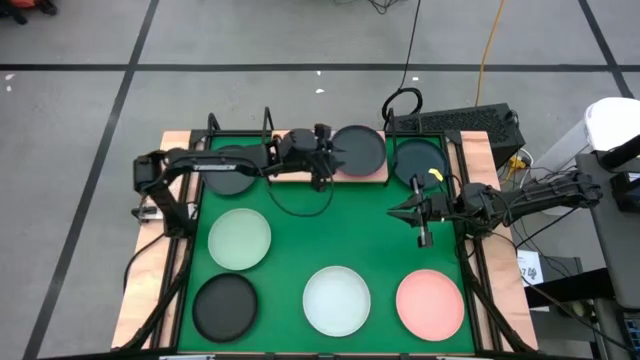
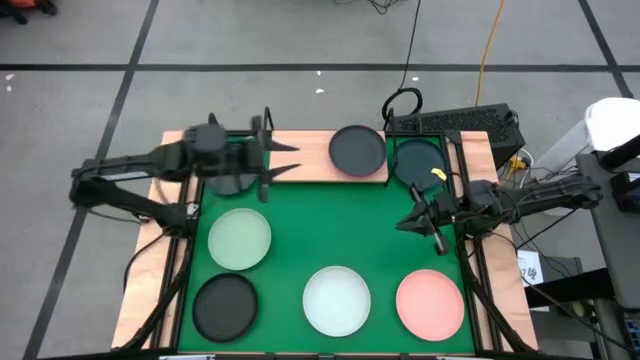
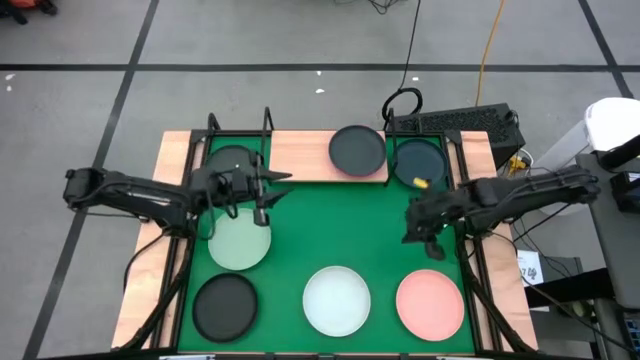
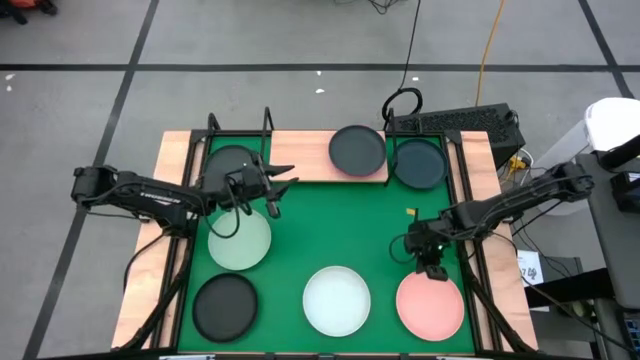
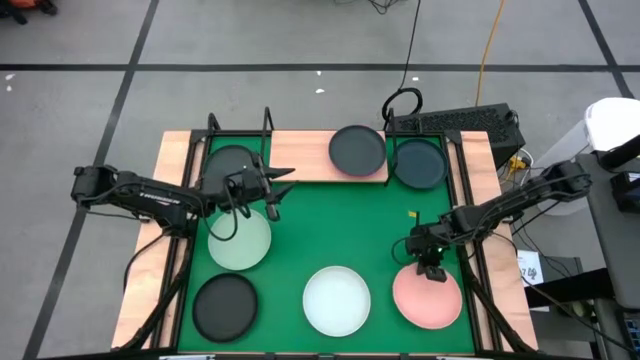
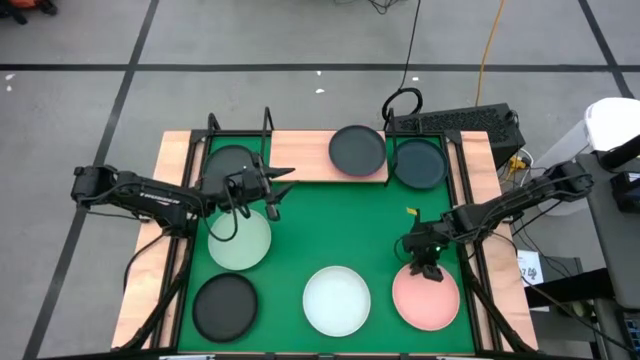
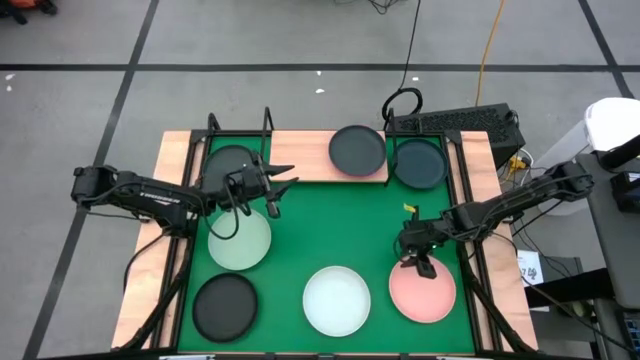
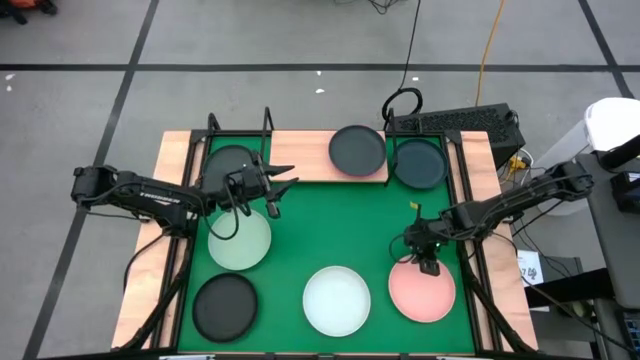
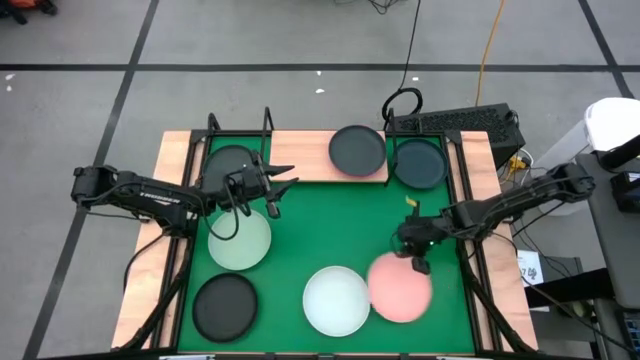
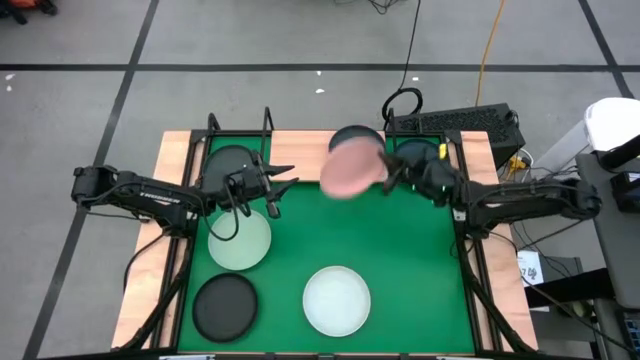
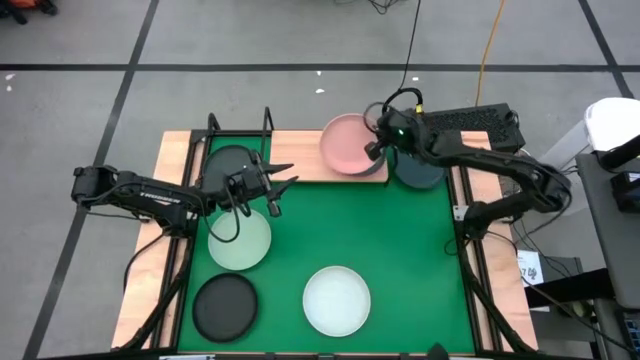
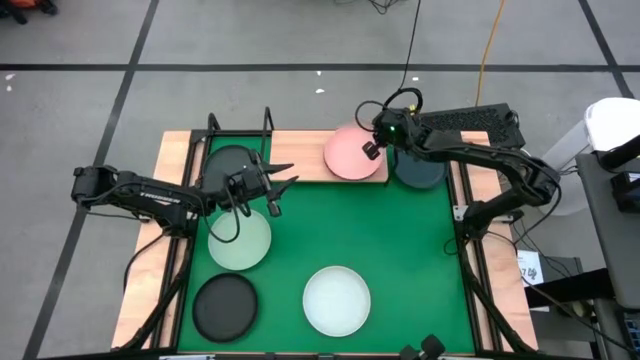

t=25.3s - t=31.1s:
Task: Place and stack plates onto a shelf
Stack the light orange plate on top of the black plate on the shelf

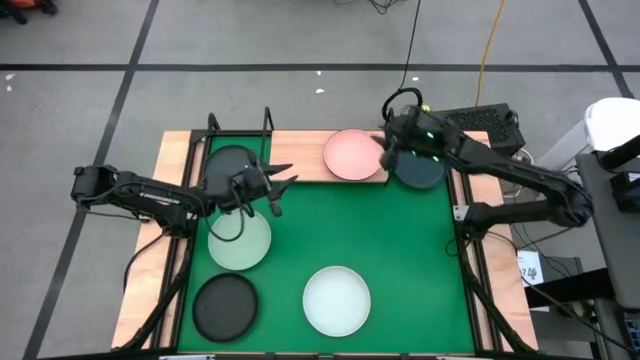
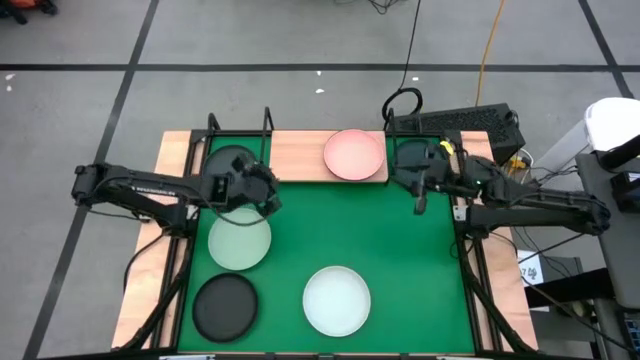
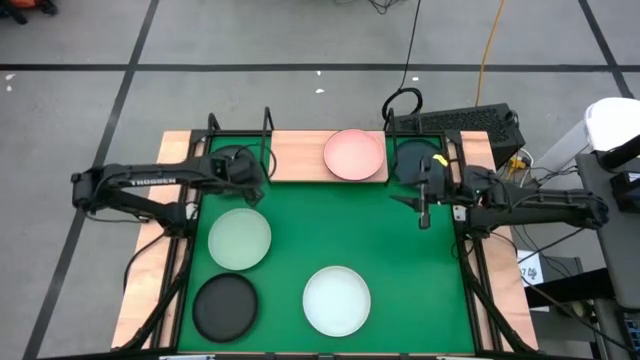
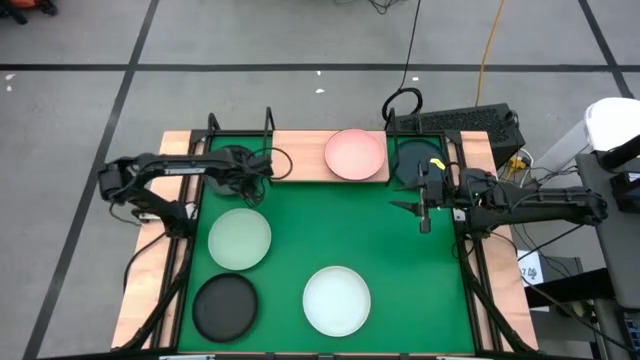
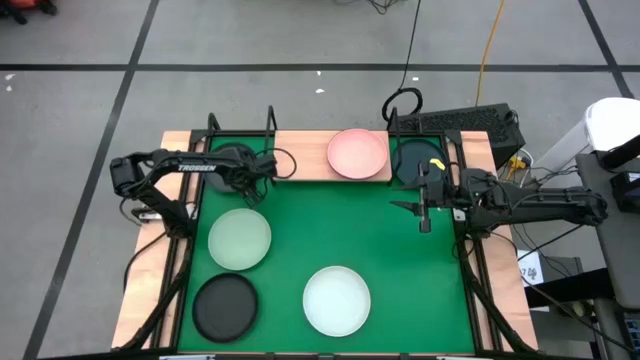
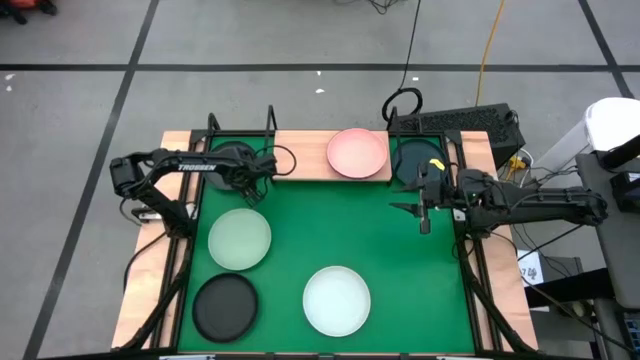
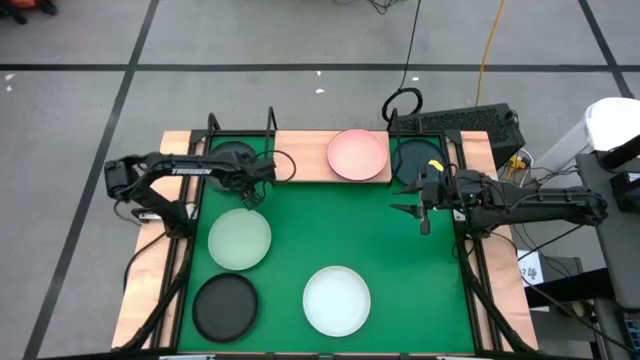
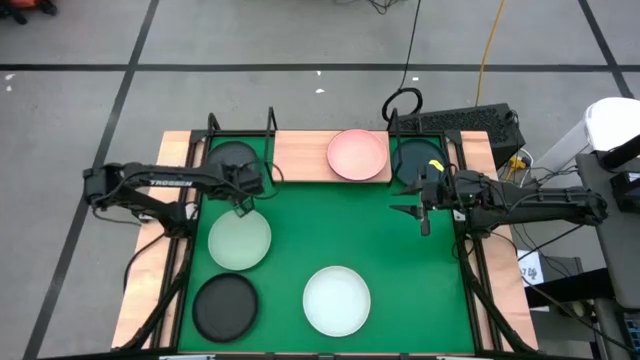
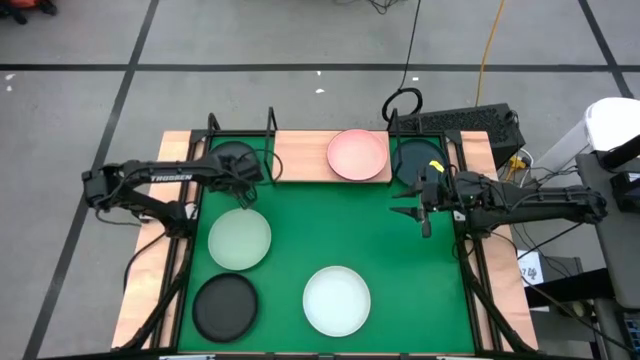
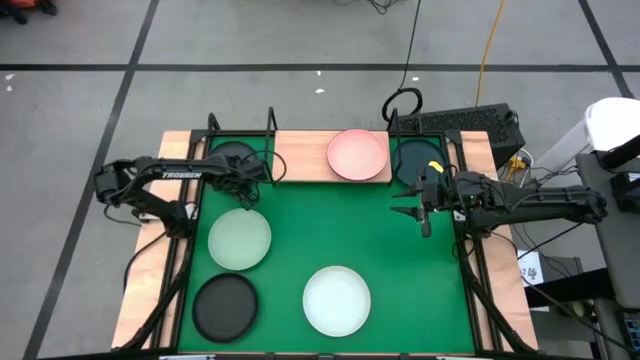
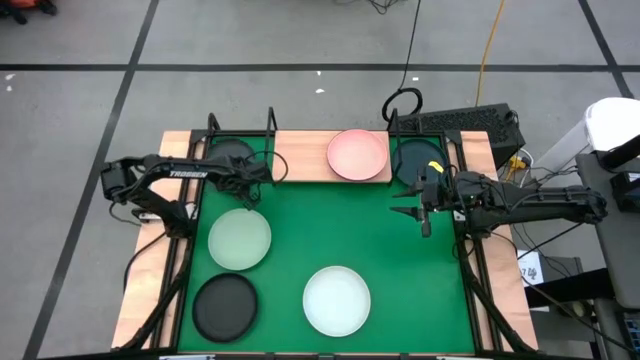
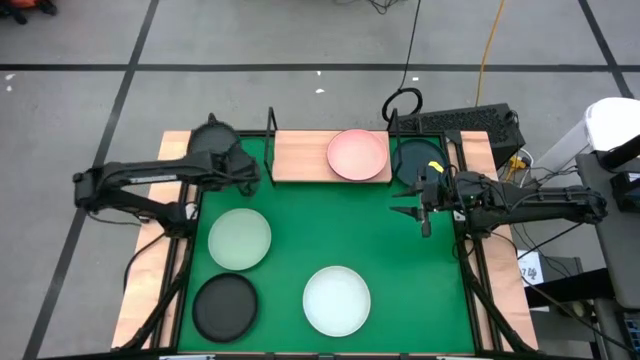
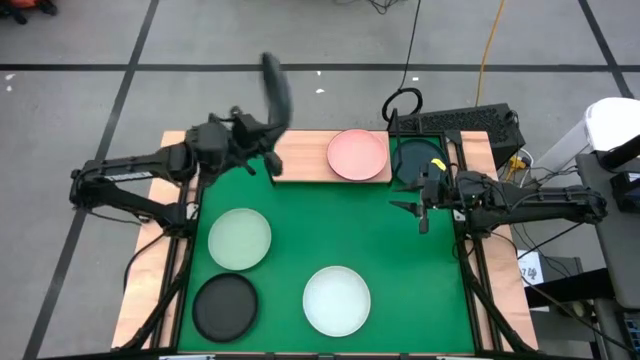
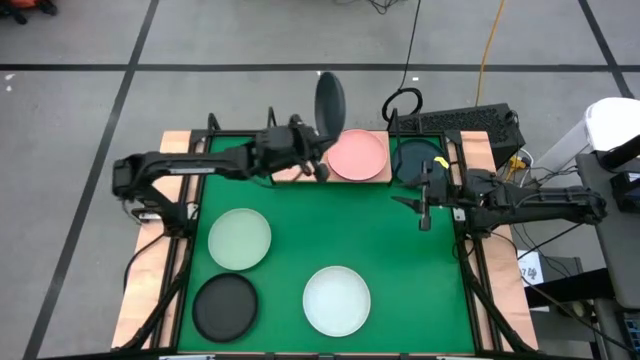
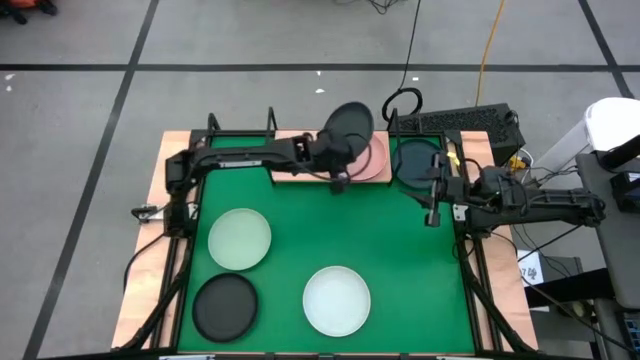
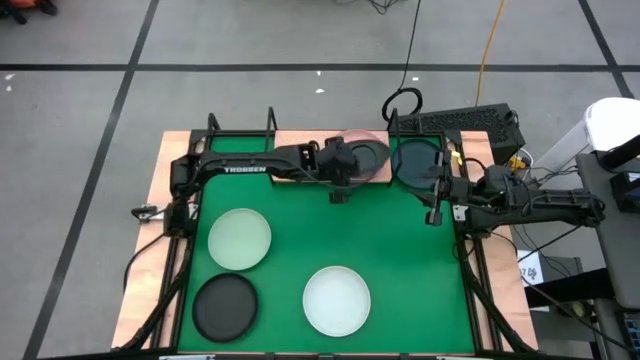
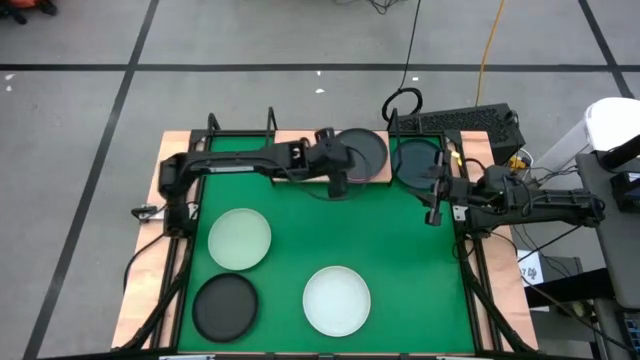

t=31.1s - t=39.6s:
Stack the top black plate on top of the light orange plate on the shelf

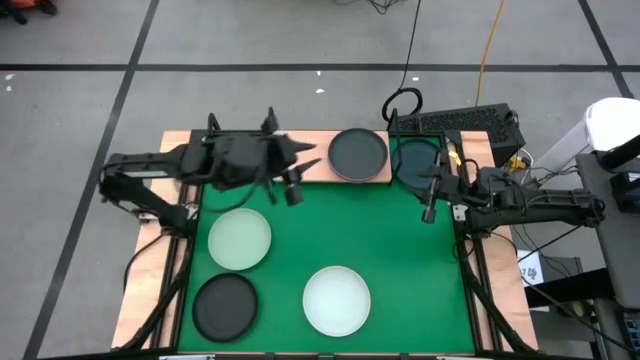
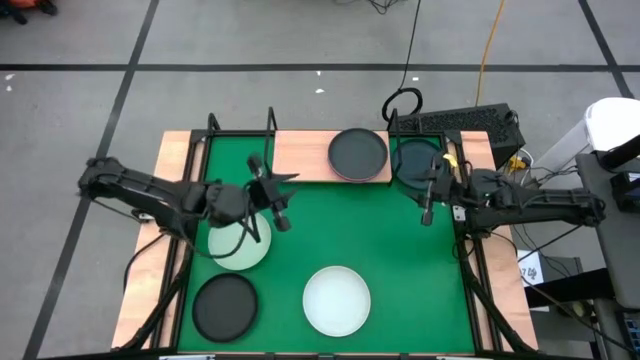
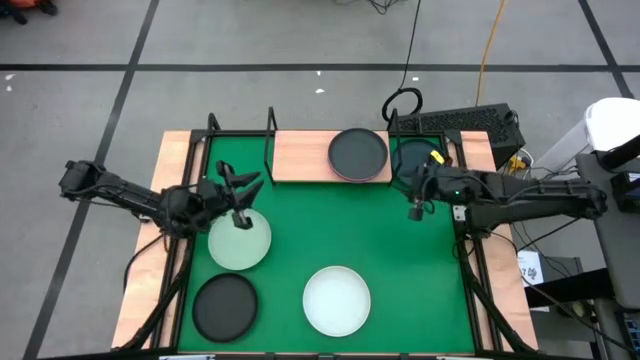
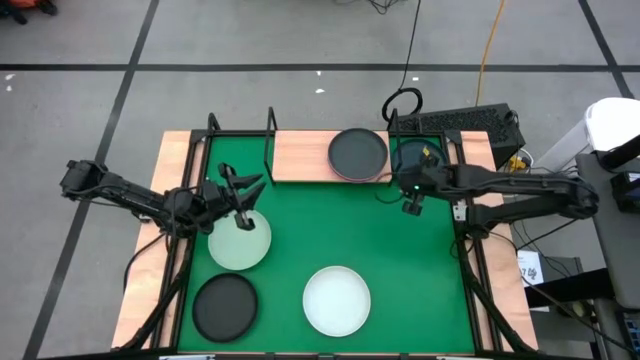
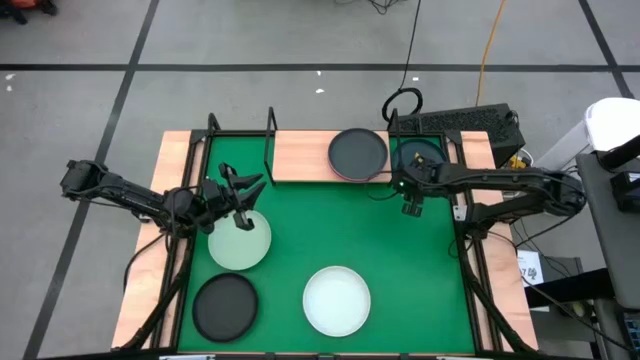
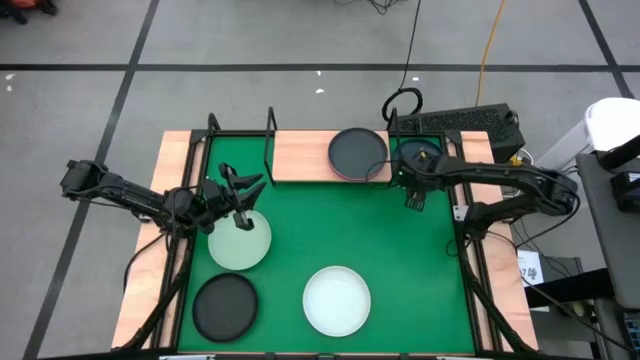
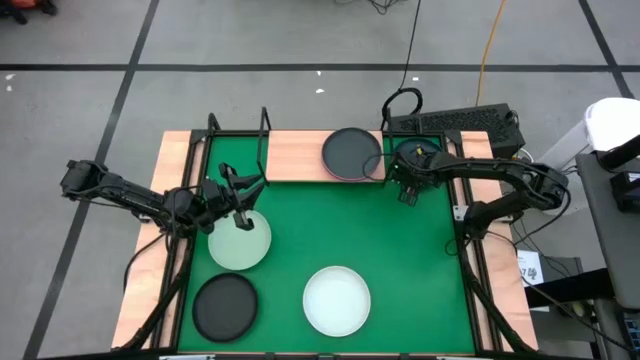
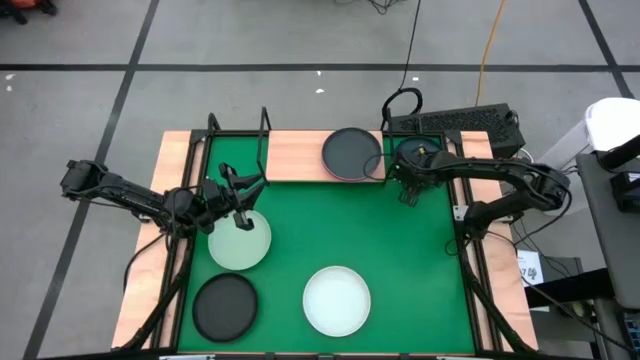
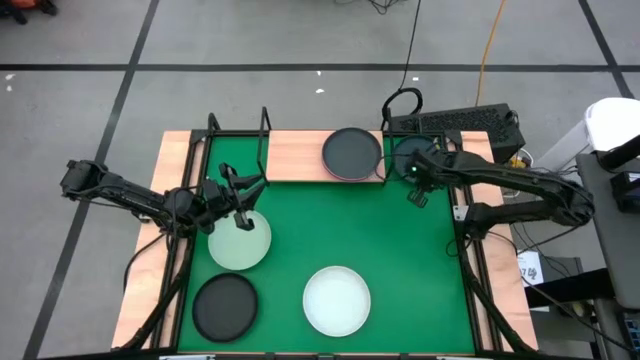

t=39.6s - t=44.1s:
Put the dark blue plate on the shelf

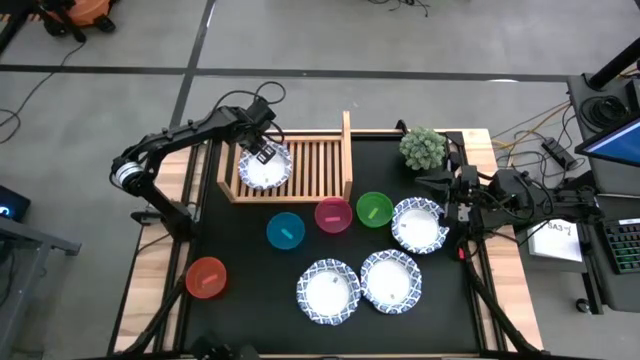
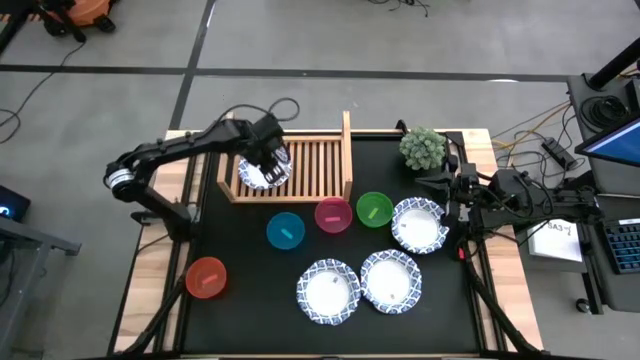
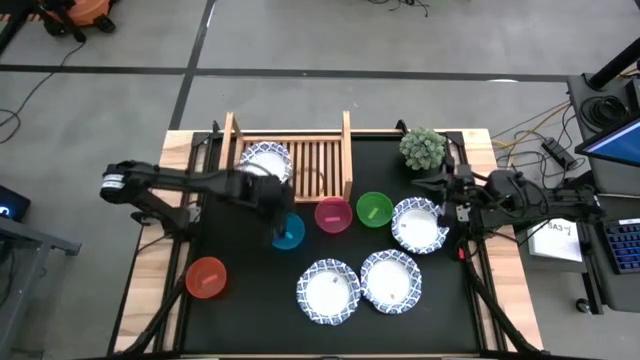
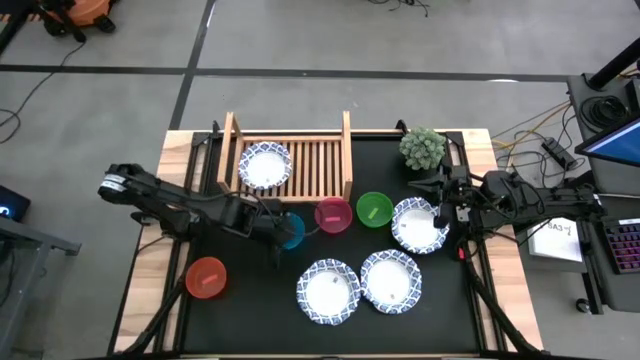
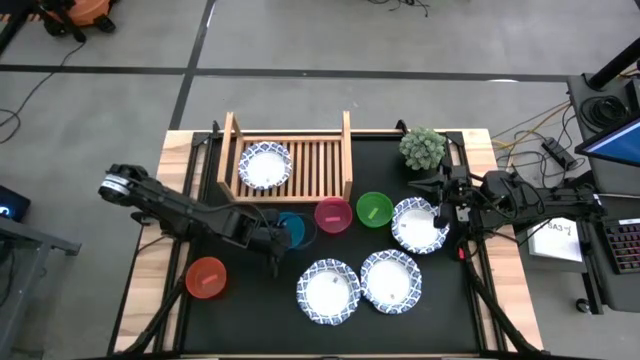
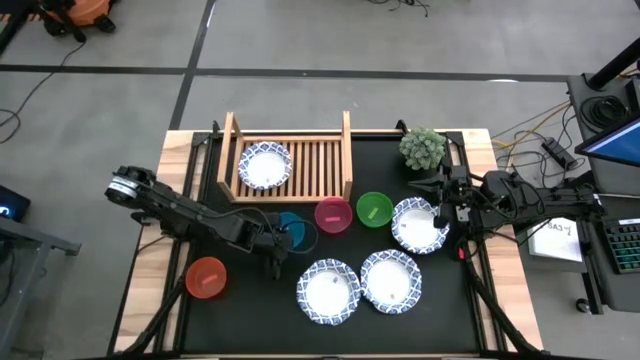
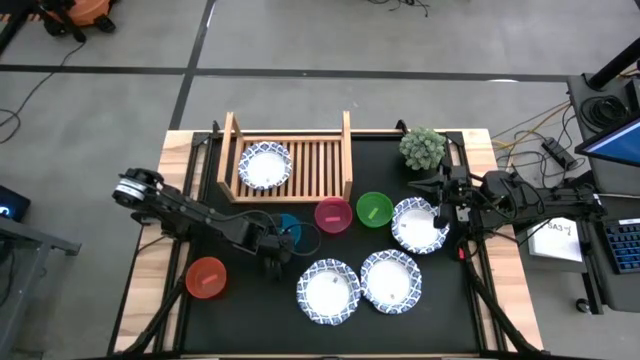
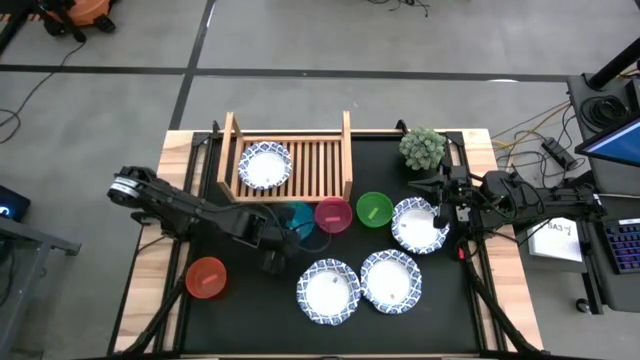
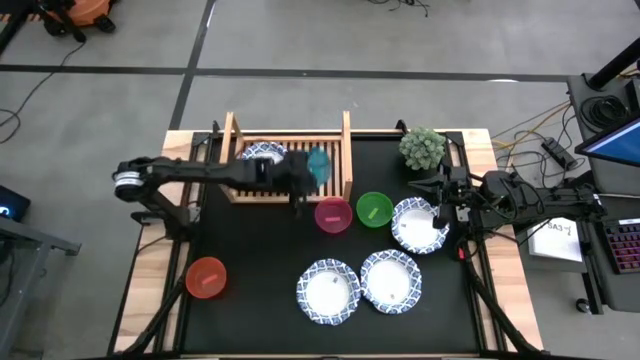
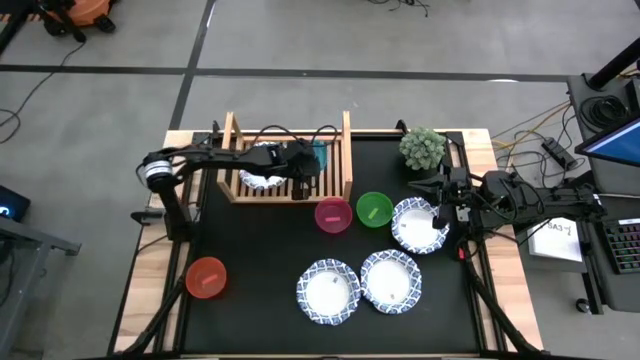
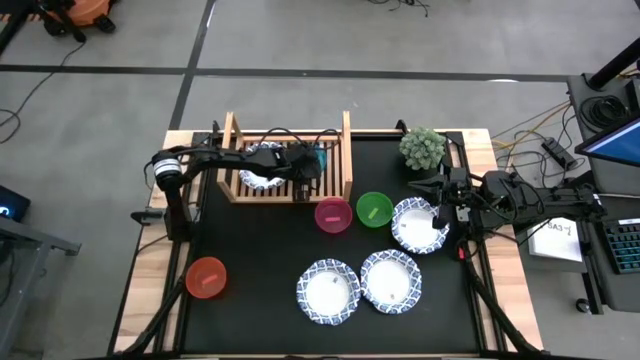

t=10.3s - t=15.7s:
Task: Place and stack bowls onto a shelf
Put the blue bowl on the shelf
